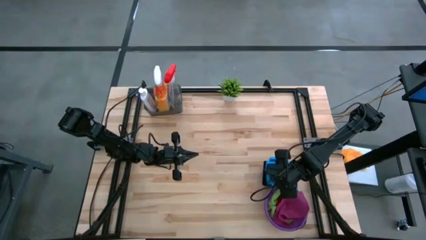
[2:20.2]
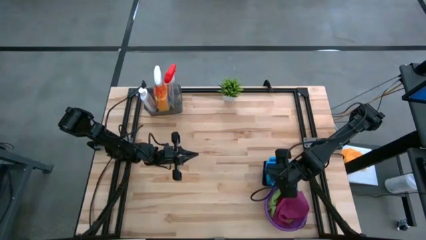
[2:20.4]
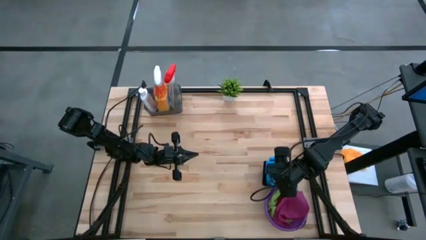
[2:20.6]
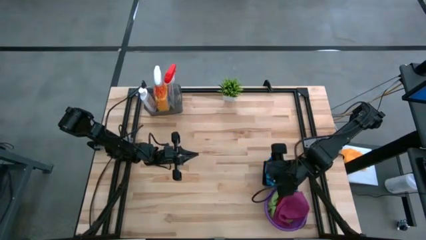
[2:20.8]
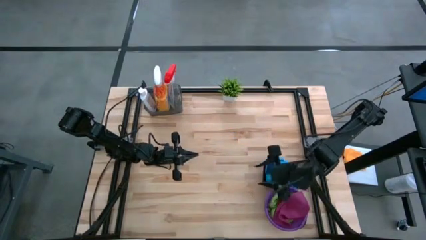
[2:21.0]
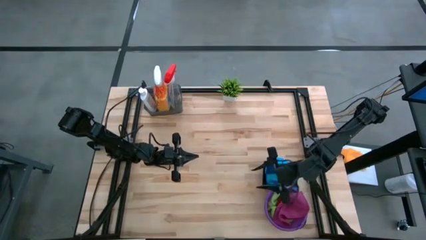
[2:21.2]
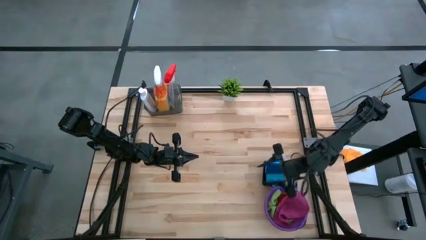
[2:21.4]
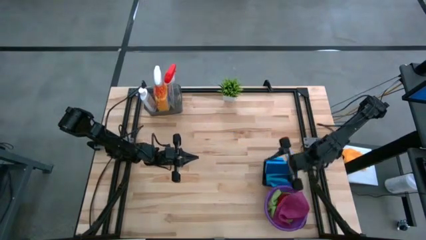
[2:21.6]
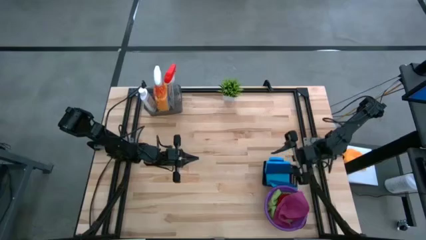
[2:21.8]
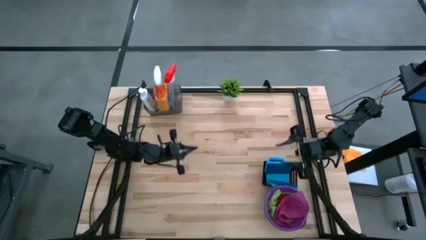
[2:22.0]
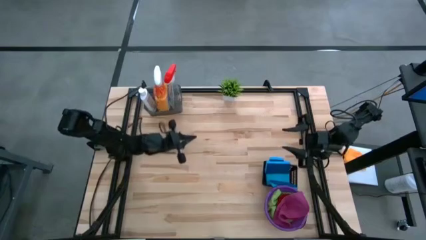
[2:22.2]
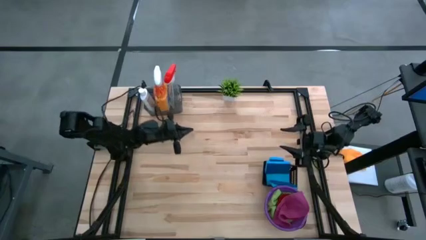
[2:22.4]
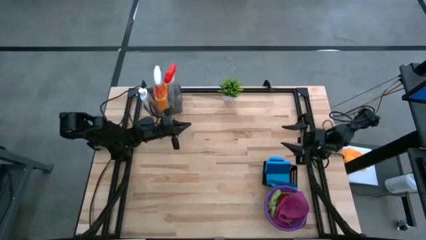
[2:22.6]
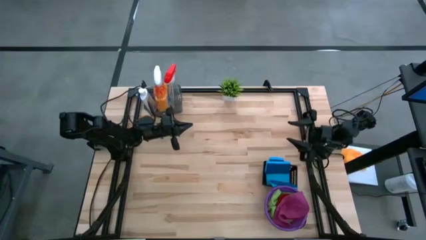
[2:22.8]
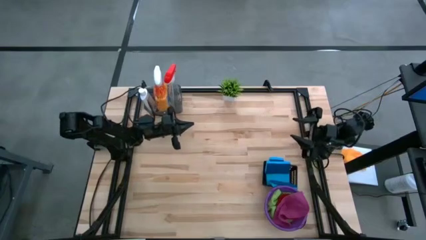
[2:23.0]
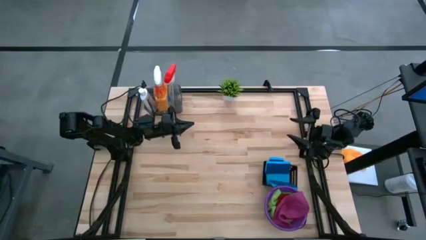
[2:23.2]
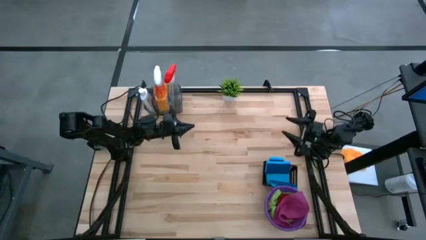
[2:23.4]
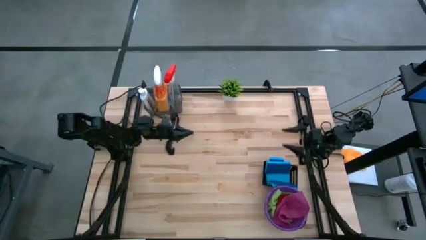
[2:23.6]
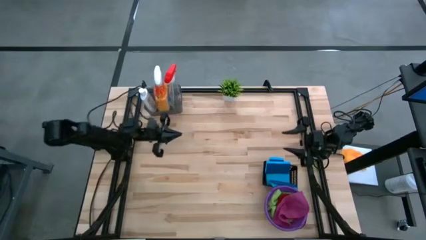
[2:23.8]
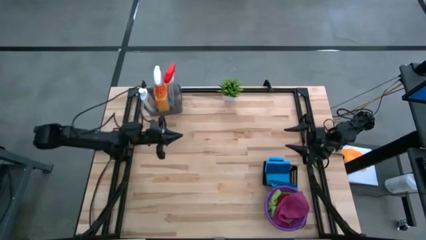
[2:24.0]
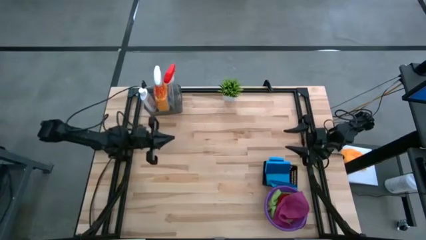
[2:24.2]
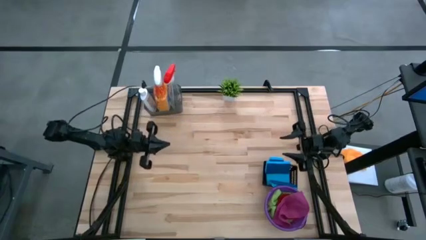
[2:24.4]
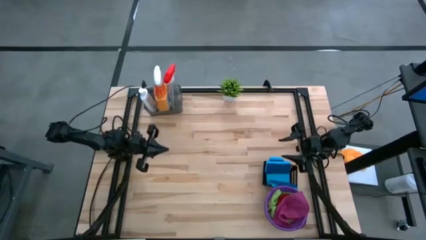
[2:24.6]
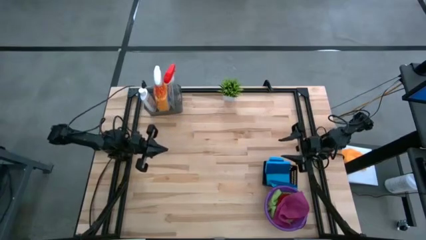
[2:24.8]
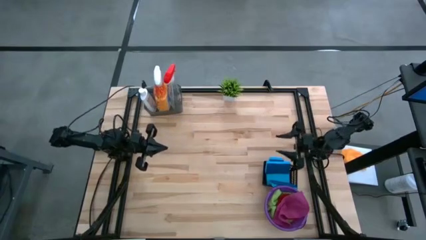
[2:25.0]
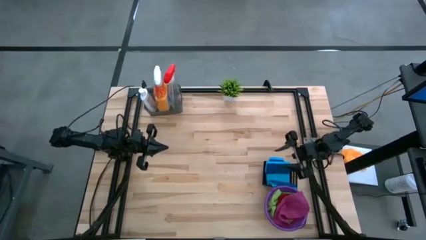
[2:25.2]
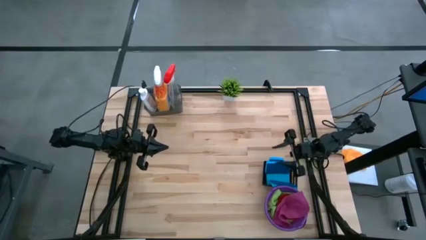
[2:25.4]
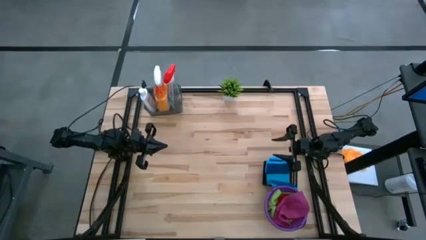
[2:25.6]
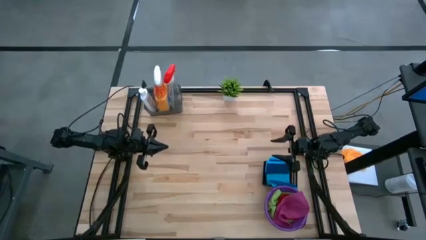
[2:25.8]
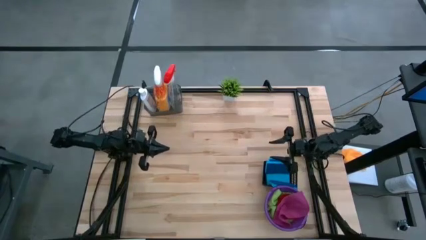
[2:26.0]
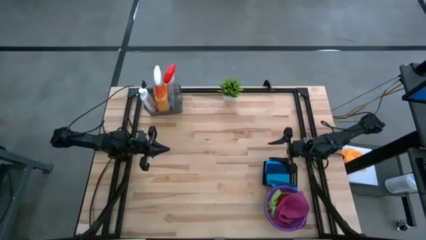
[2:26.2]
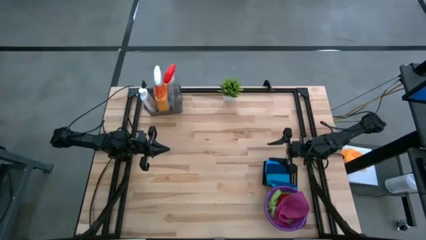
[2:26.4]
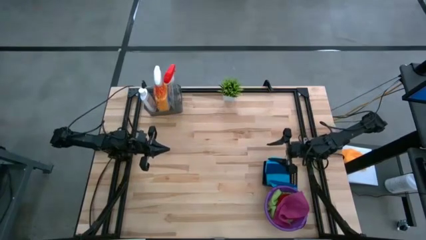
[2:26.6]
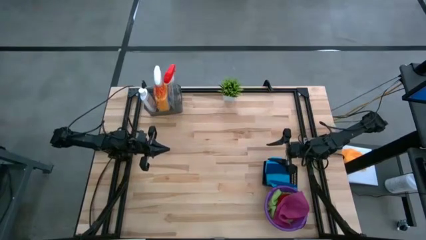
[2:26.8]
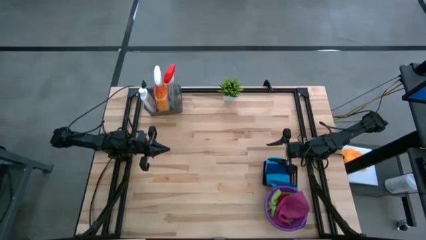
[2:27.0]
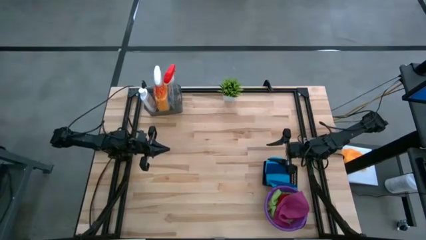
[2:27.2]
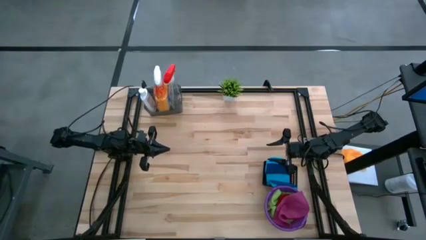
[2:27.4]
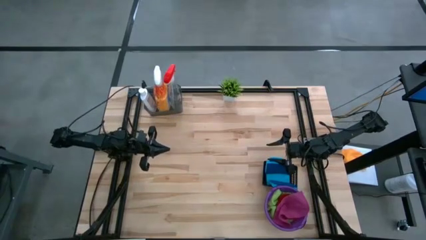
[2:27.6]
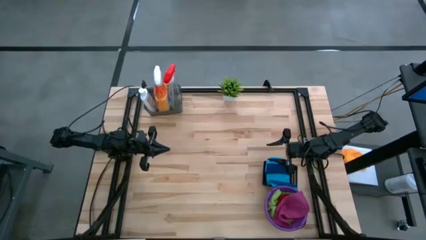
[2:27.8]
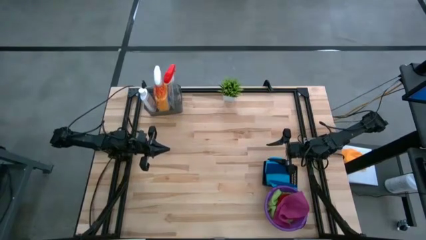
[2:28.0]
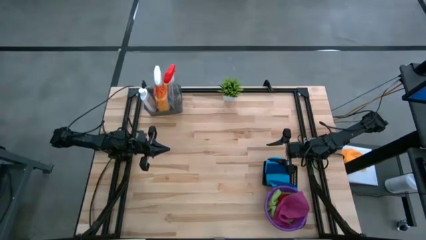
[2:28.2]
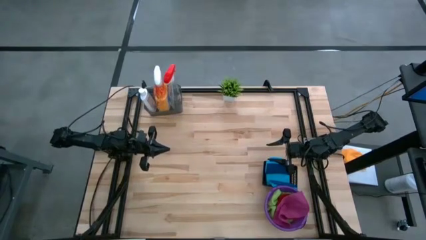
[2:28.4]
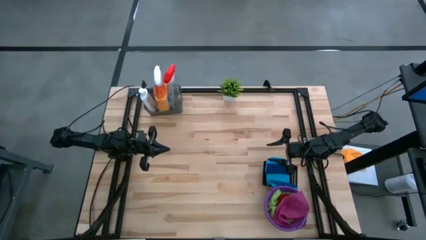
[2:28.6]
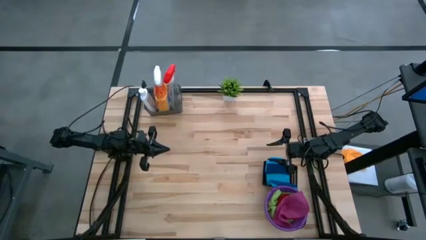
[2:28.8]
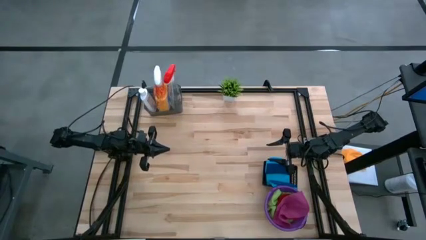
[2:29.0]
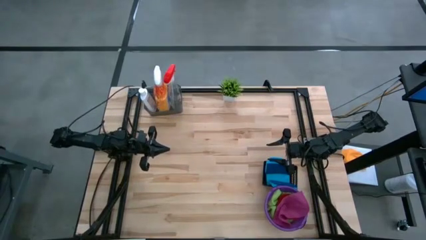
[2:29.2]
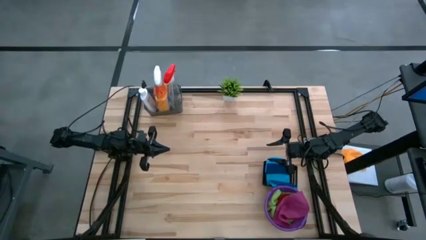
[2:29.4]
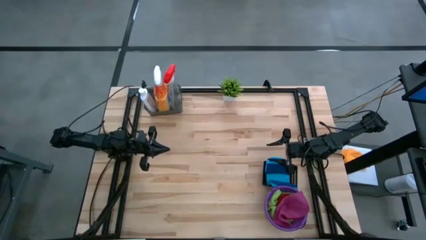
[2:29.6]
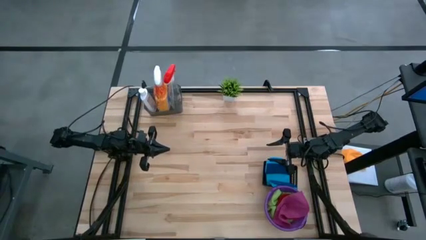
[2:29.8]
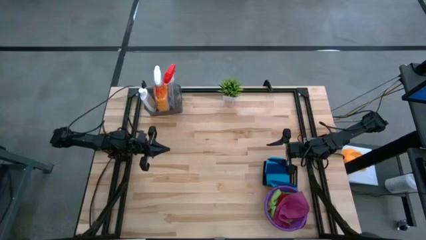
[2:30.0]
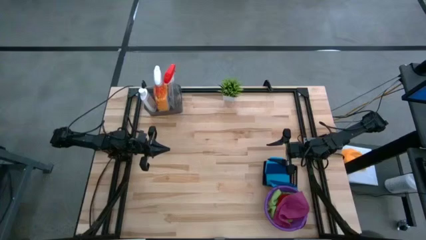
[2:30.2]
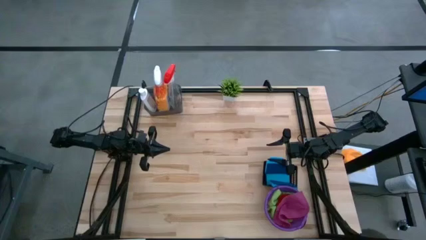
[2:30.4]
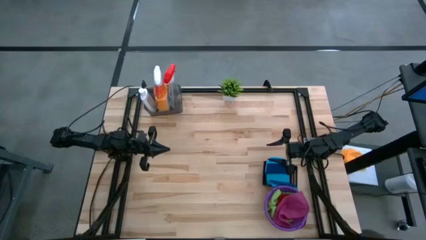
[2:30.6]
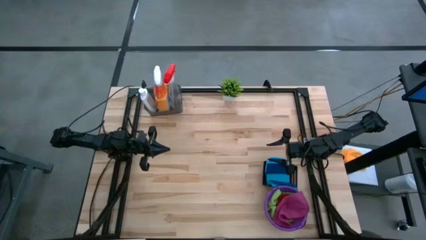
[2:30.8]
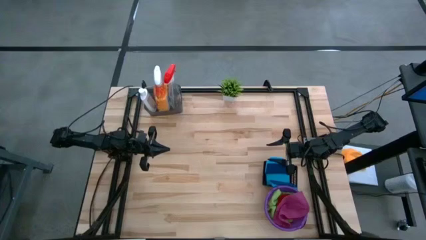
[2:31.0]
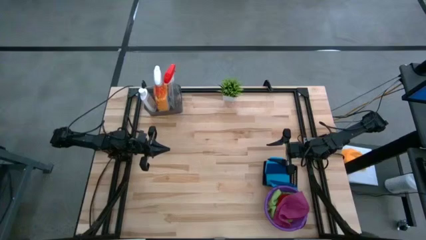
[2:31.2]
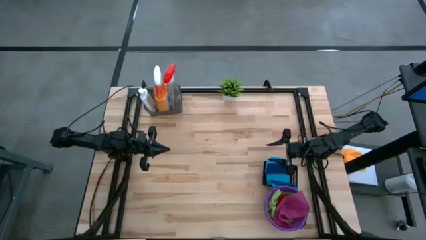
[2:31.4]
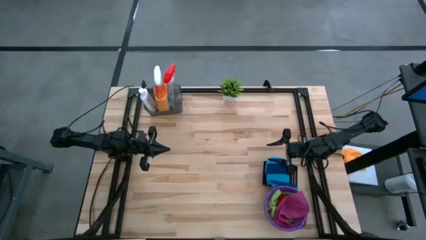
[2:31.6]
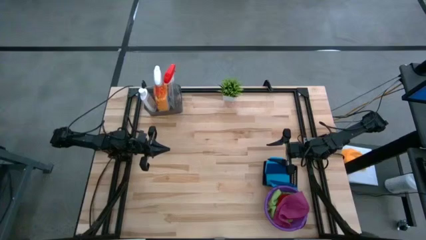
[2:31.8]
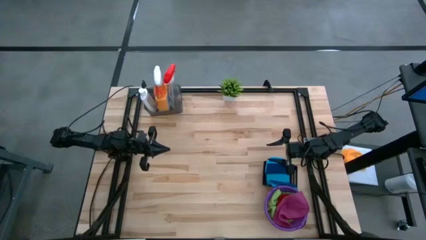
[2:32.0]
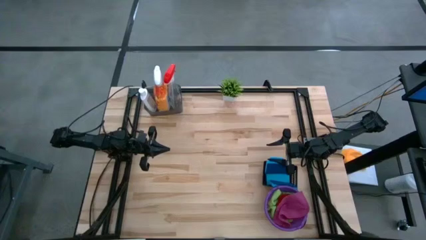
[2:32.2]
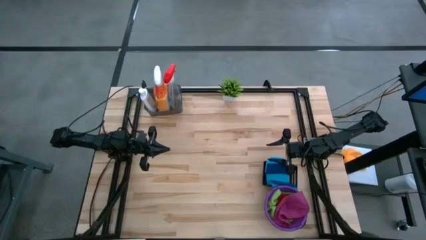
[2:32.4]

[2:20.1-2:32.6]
Task: Pick & Place Kitchen Items
Return to Home Position

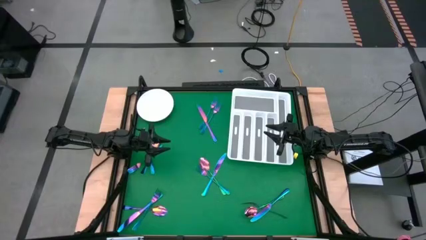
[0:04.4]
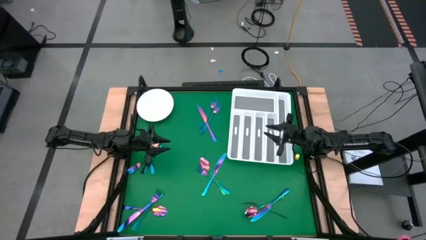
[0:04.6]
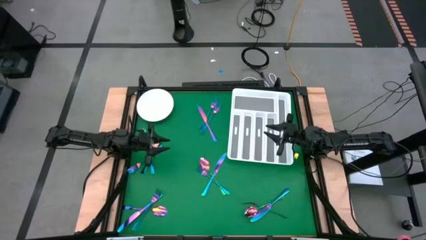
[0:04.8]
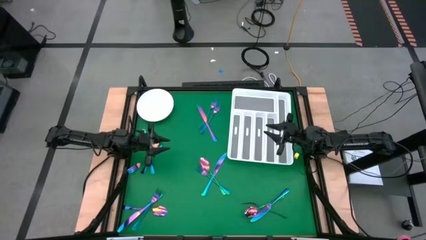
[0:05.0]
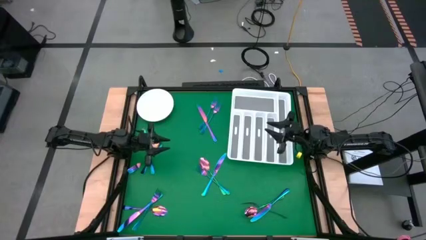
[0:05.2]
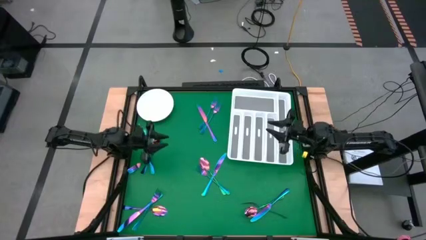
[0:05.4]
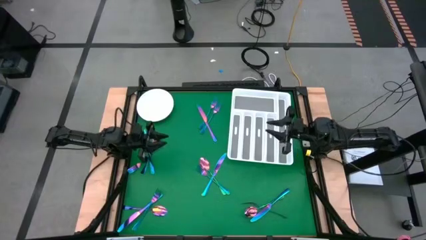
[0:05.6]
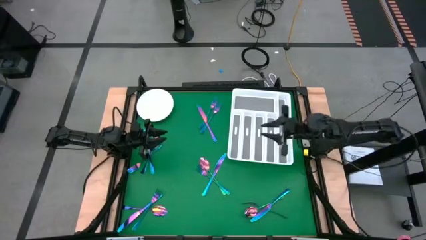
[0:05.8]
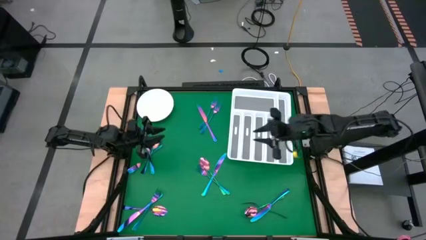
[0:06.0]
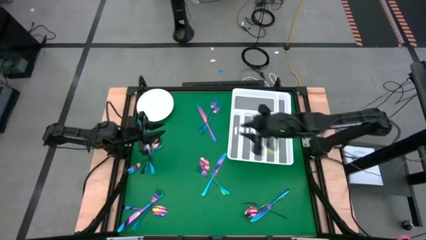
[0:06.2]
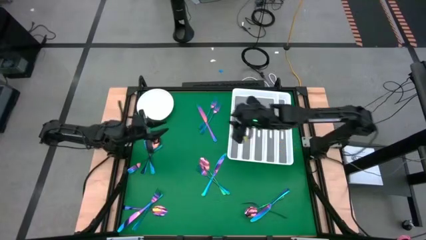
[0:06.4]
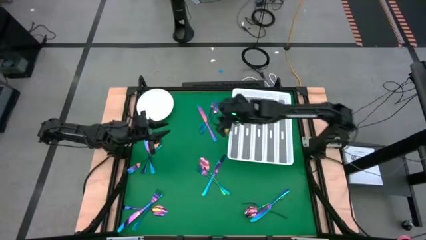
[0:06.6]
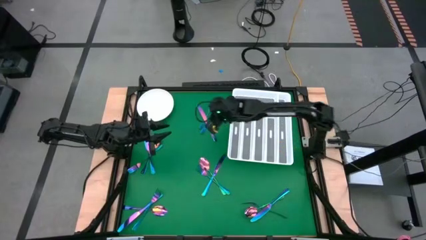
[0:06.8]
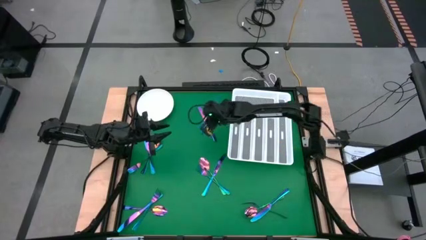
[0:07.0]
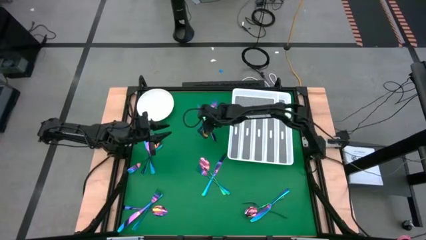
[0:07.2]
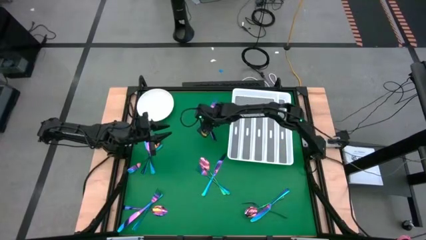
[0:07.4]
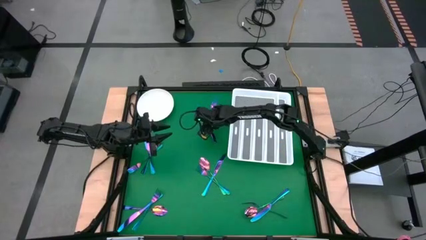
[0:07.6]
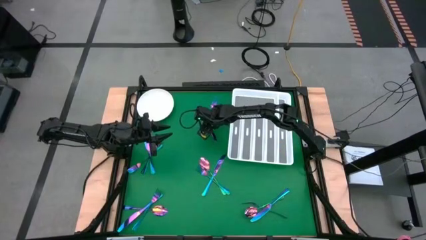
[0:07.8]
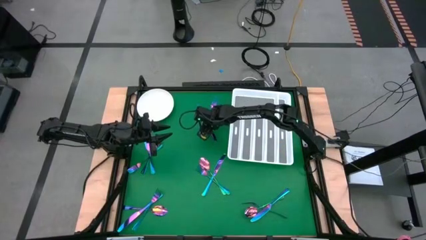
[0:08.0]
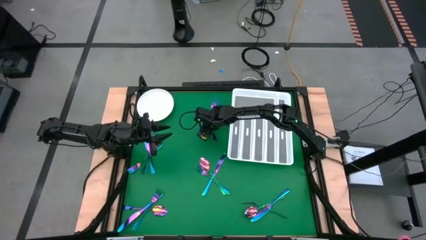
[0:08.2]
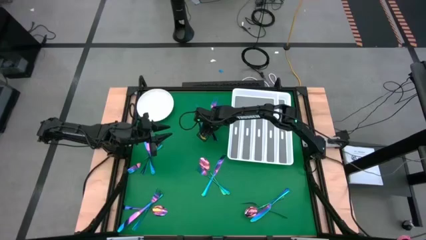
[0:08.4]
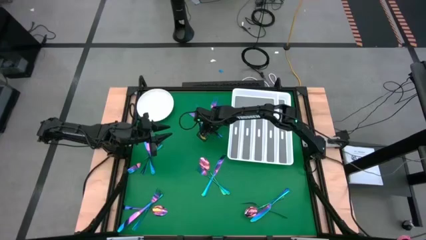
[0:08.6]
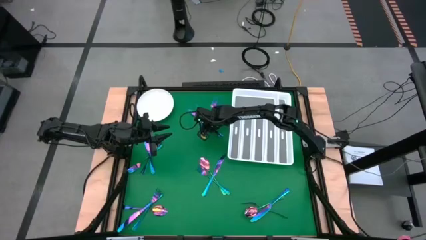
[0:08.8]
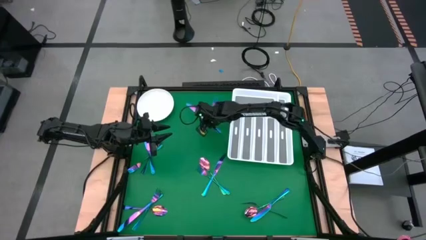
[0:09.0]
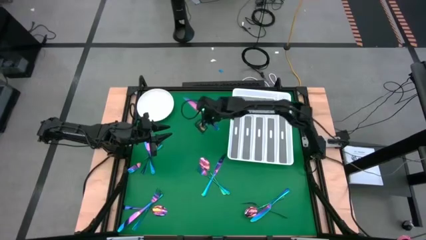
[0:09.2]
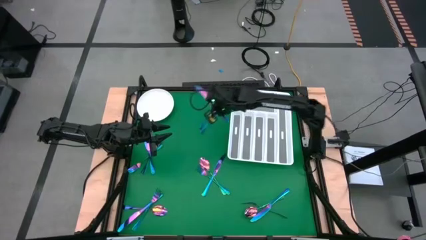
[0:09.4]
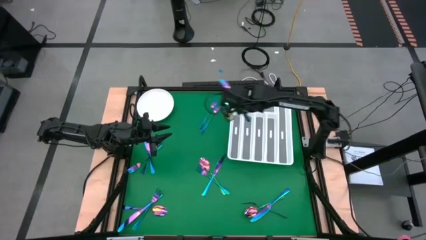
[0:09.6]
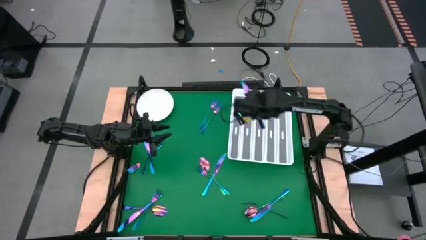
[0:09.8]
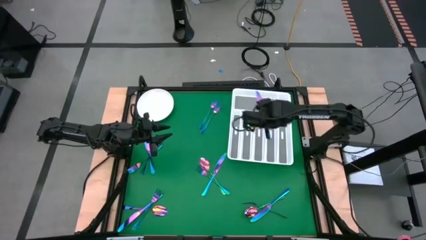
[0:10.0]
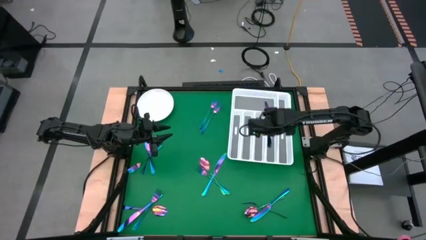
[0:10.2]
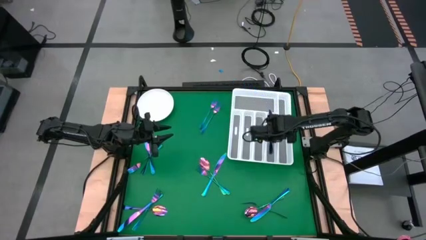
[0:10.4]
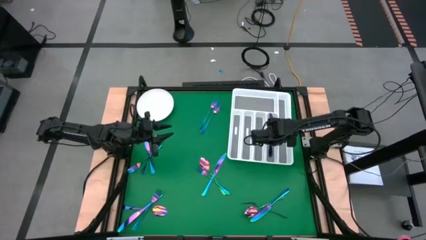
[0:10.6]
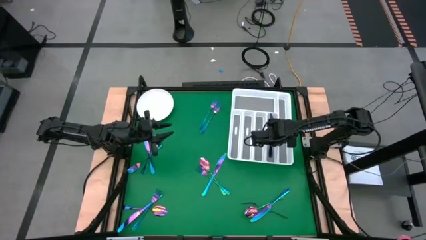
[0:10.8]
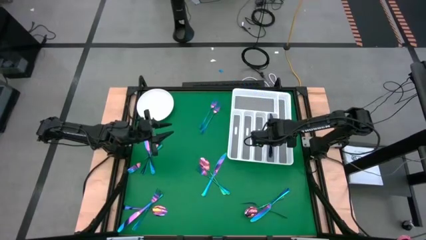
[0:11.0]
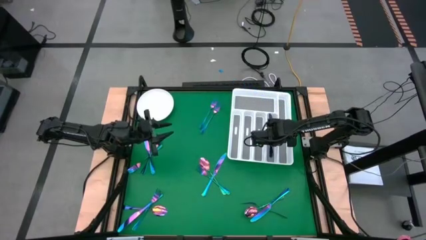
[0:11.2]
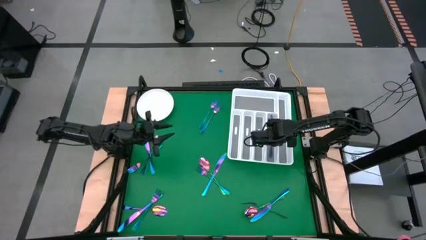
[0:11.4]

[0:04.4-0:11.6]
Task: Sort silverware
Put the blue knife into the white cutlery tray
